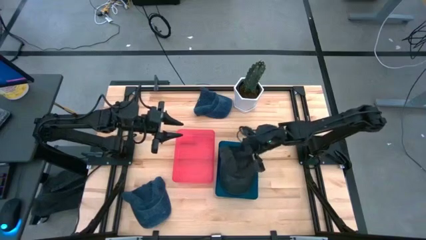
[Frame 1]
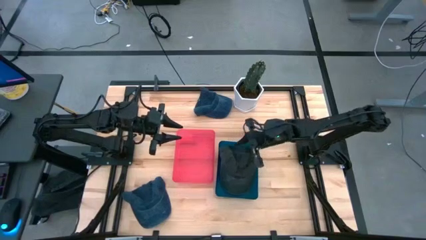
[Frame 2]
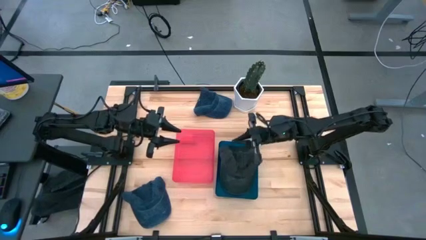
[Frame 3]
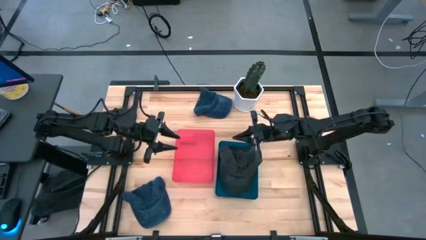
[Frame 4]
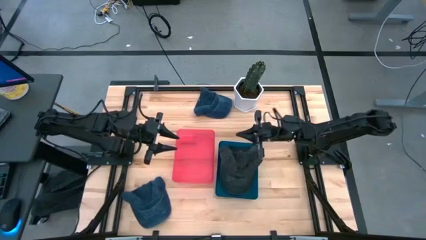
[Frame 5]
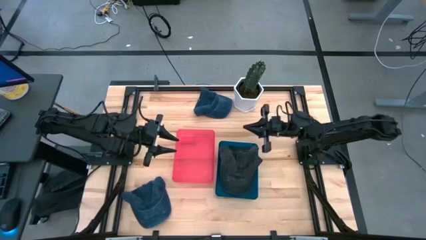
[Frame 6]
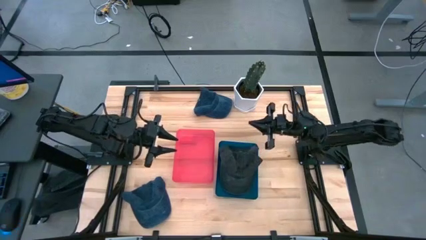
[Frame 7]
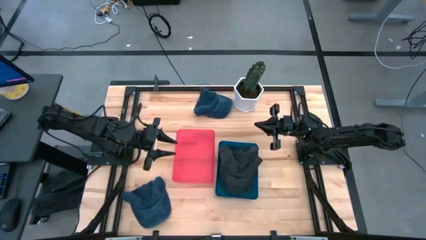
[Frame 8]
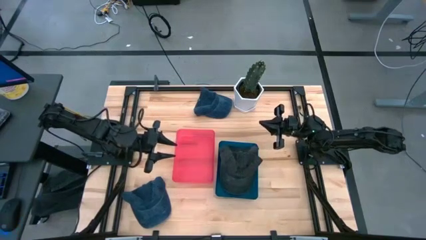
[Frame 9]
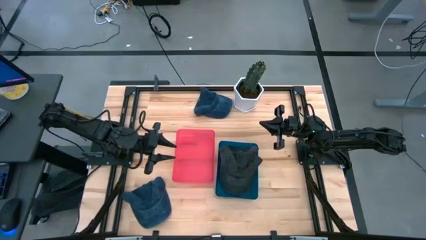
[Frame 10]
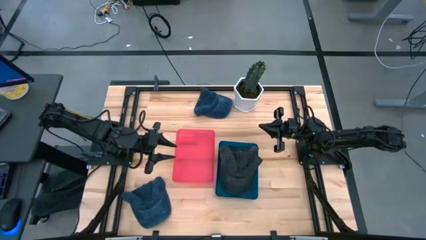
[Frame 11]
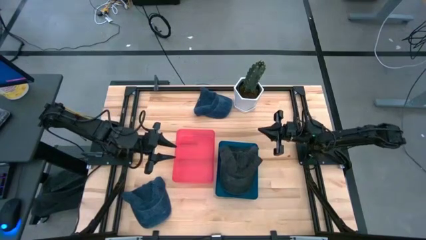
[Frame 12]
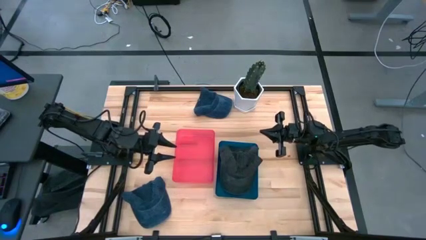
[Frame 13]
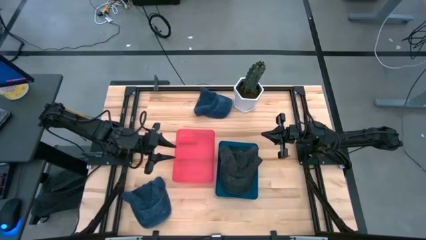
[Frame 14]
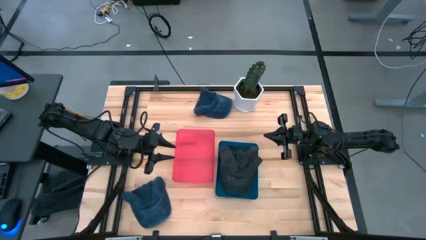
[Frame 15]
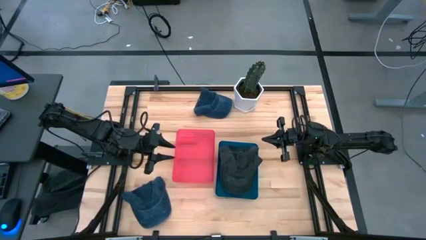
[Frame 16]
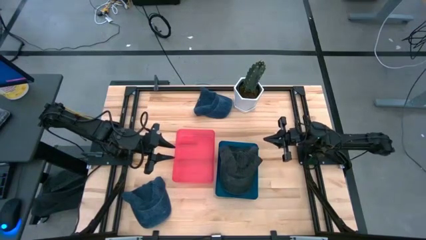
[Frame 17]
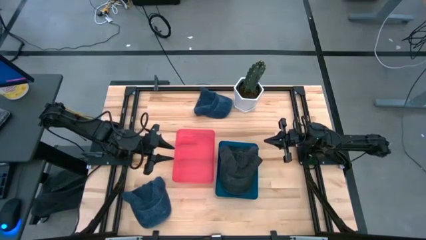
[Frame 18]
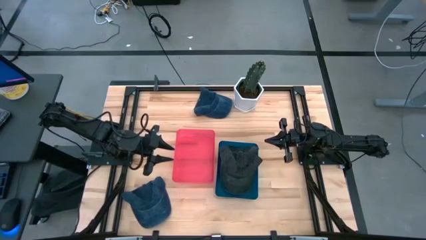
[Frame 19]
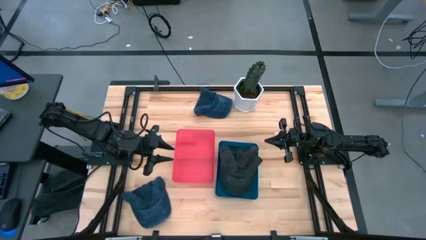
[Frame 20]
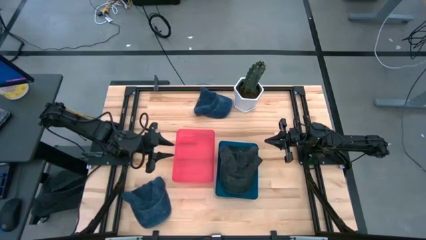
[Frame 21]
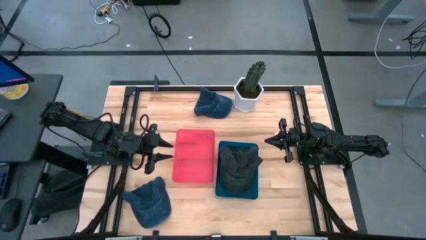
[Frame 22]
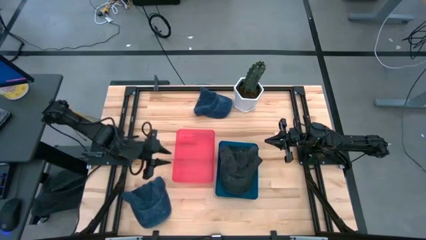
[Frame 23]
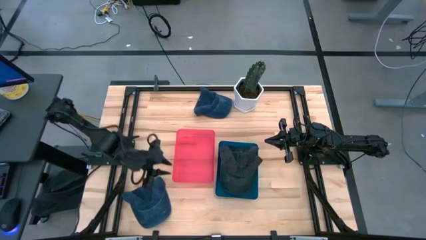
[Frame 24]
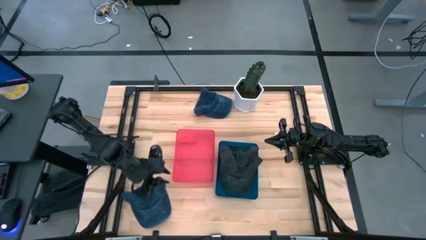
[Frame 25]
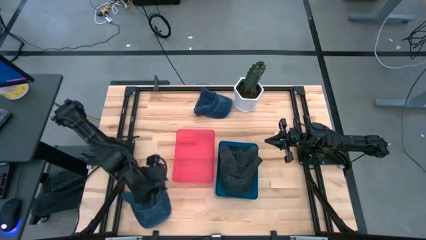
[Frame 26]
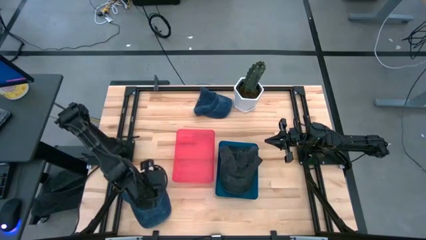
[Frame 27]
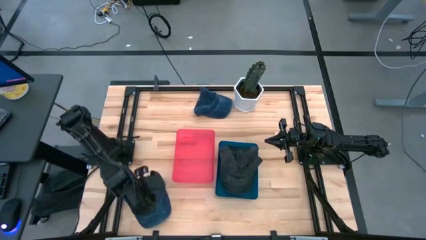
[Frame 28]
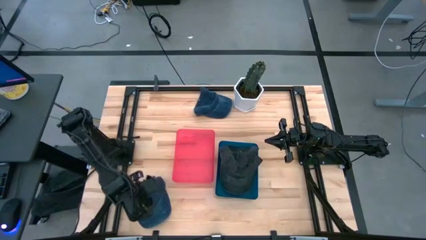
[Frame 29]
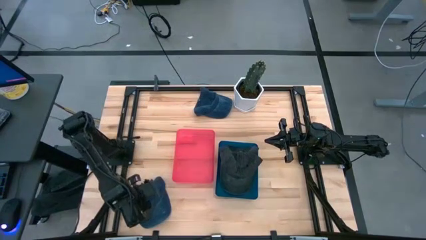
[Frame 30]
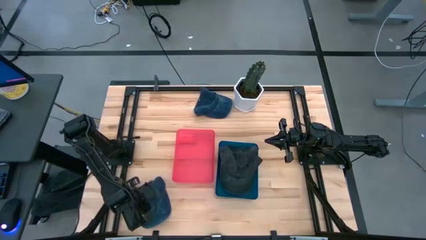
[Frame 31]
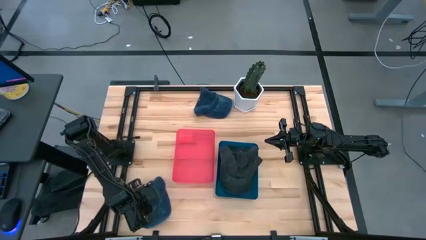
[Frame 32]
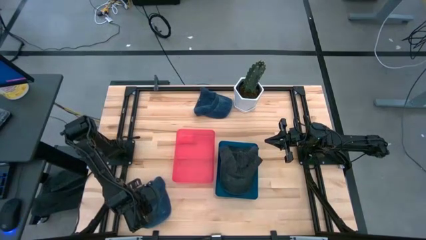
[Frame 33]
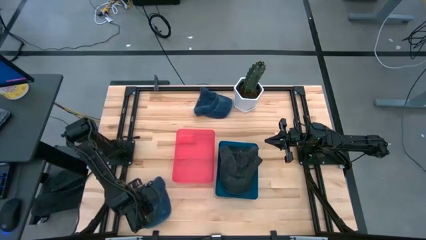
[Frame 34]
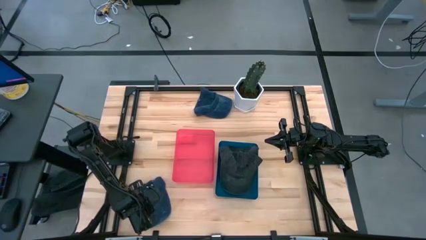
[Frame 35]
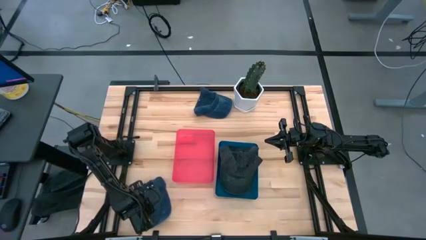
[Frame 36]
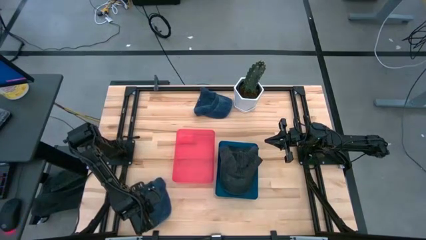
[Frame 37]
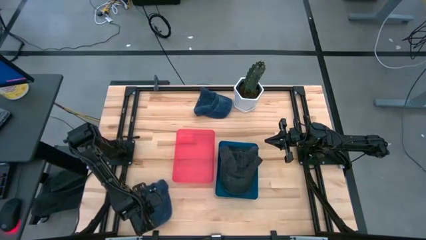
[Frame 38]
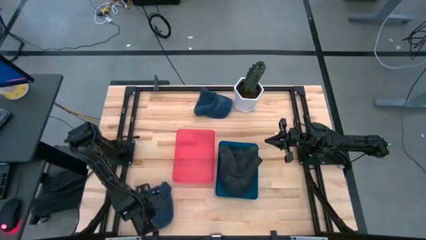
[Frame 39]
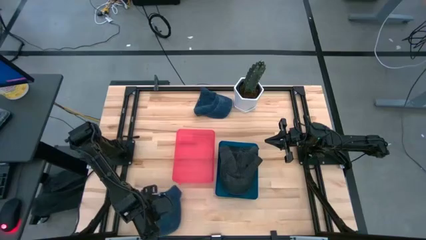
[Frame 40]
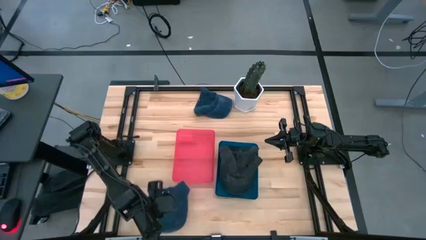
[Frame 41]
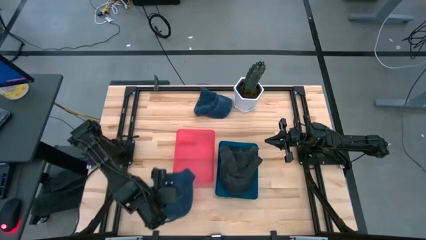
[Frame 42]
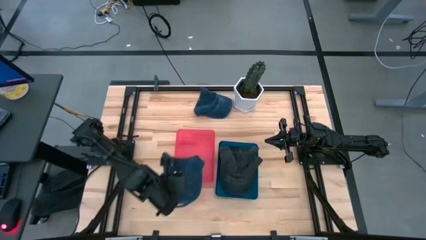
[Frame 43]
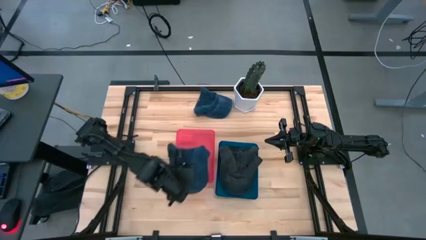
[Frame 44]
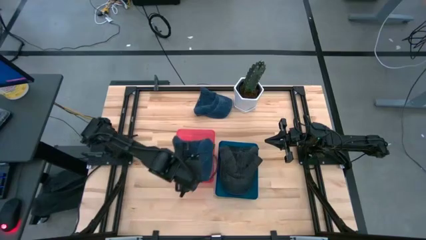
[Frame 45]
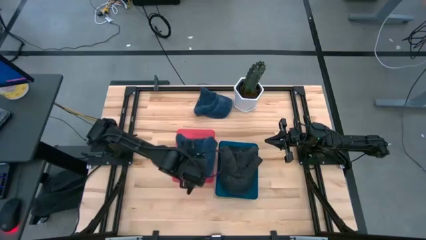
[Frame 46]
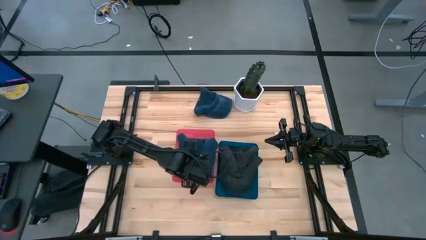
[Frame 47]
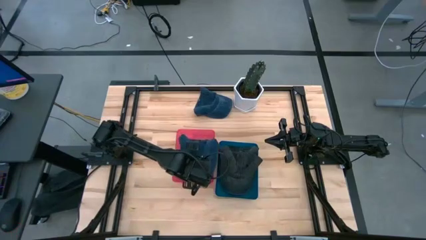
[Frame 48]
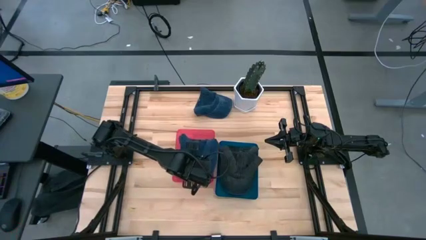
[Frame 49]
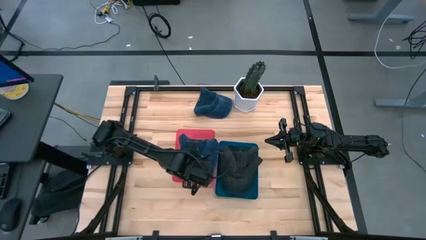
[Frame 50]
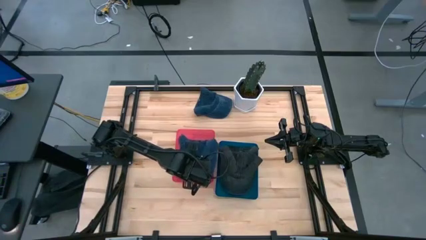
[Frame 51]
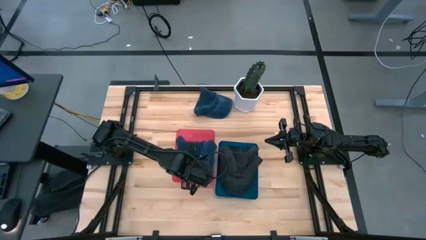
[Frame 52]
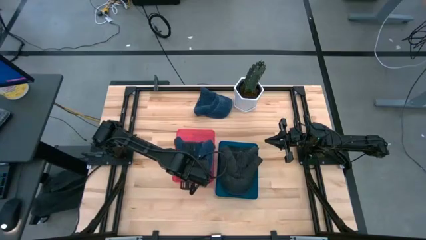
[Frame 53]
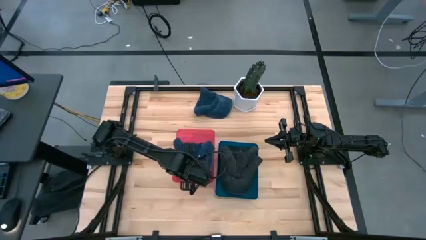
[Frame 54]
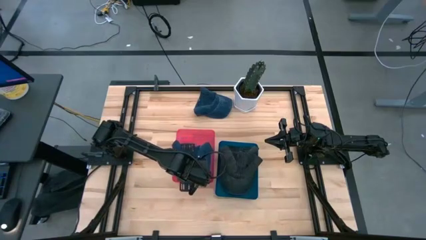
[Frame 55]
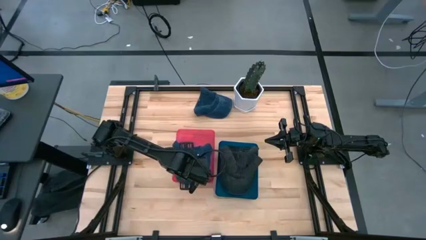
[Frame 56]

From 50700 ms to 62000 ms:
Task: Pick & Place hat
Put the bottom blue cap into the red bin

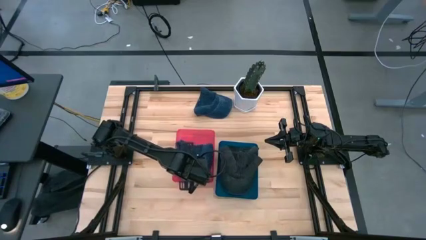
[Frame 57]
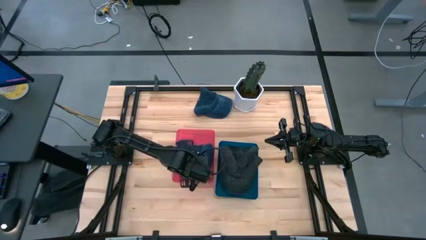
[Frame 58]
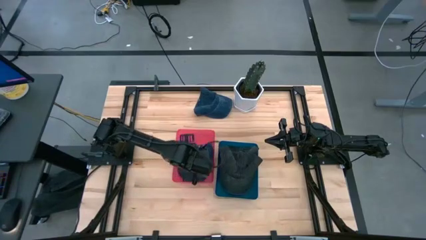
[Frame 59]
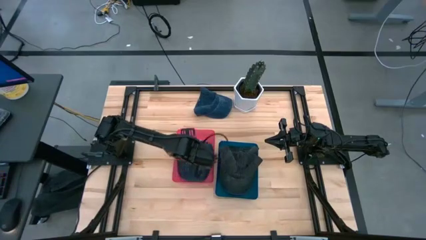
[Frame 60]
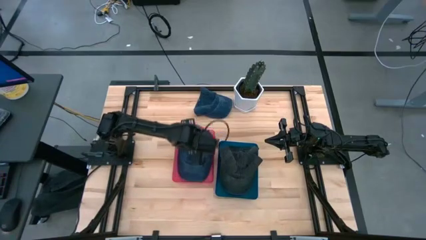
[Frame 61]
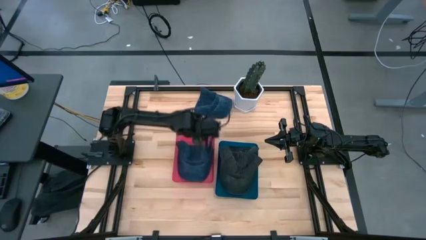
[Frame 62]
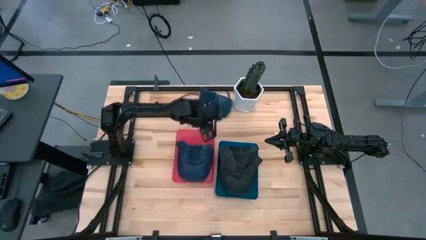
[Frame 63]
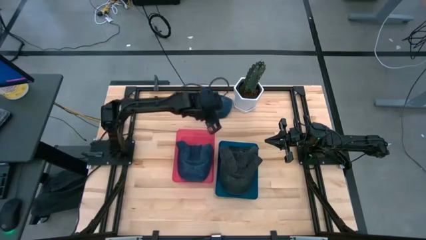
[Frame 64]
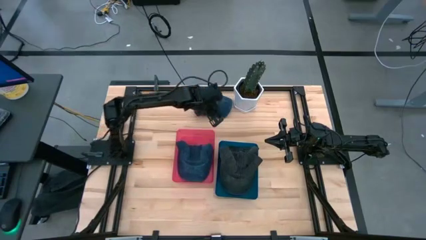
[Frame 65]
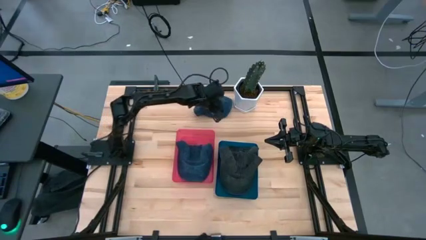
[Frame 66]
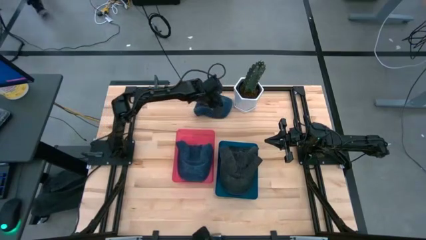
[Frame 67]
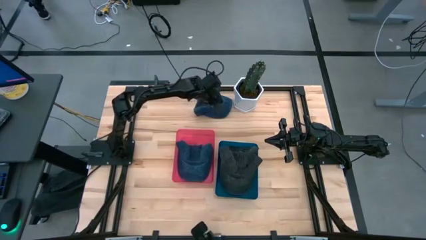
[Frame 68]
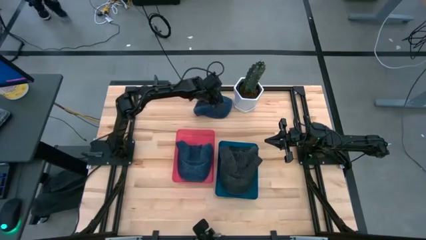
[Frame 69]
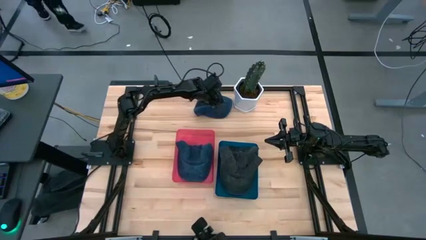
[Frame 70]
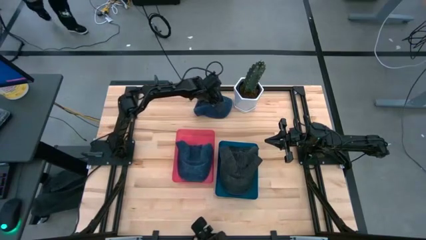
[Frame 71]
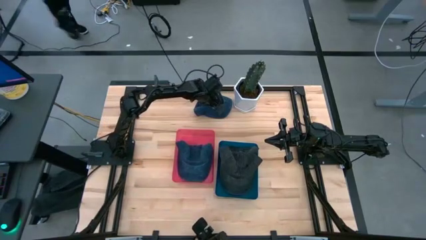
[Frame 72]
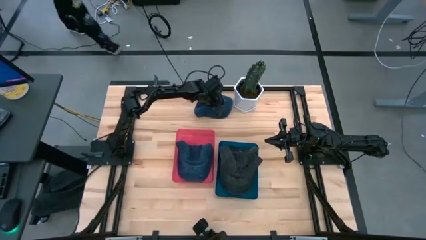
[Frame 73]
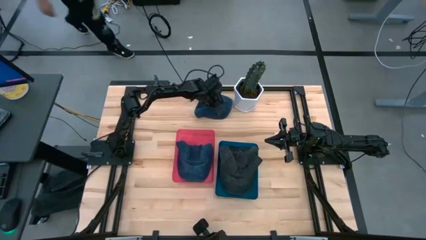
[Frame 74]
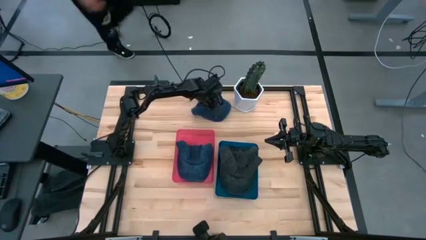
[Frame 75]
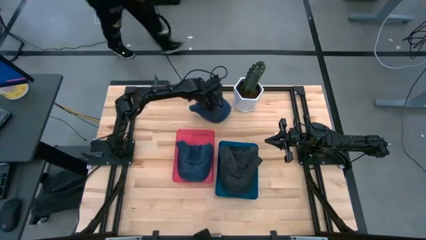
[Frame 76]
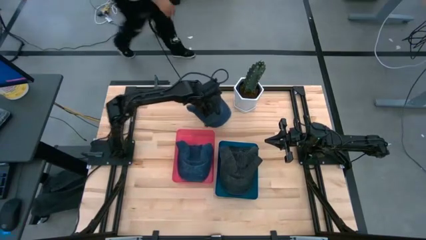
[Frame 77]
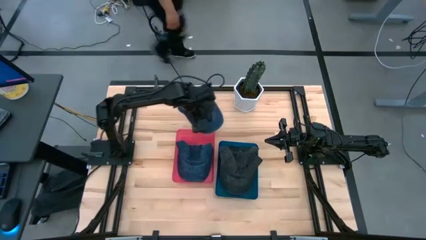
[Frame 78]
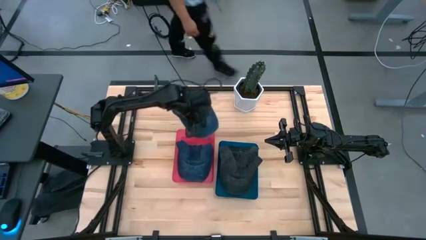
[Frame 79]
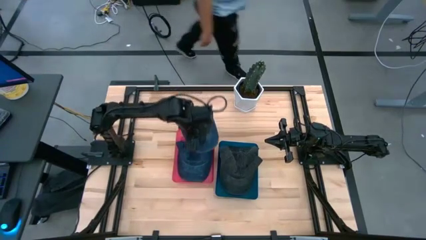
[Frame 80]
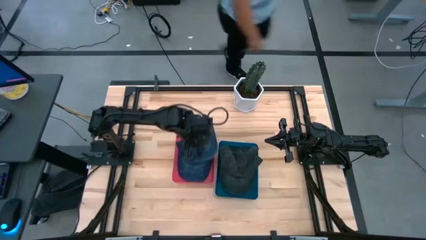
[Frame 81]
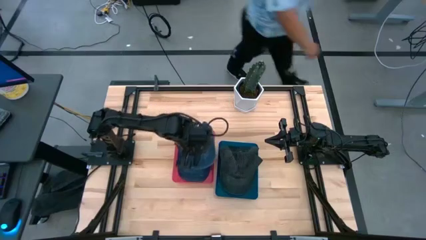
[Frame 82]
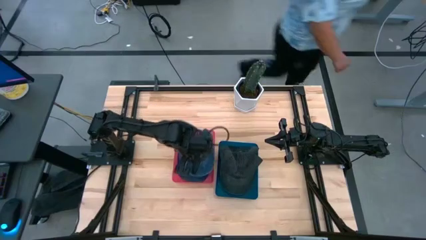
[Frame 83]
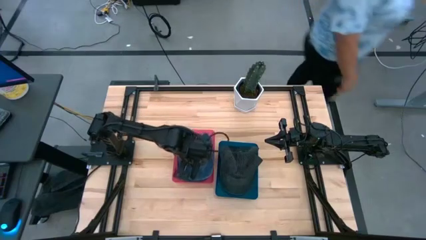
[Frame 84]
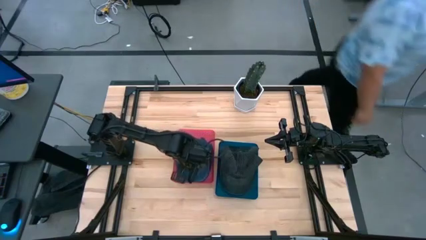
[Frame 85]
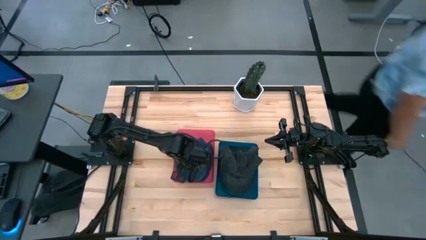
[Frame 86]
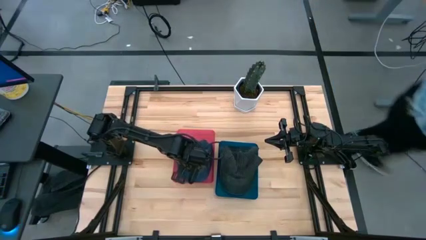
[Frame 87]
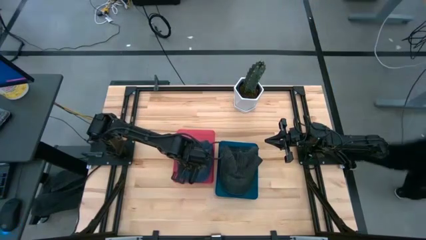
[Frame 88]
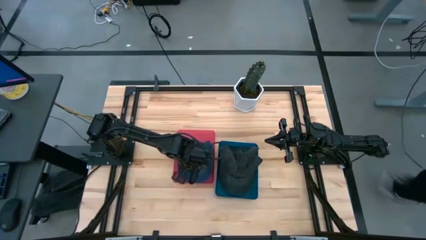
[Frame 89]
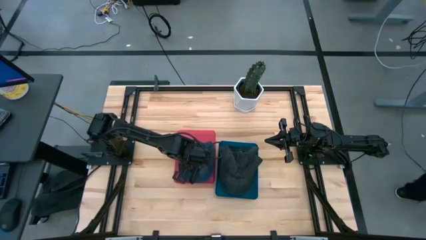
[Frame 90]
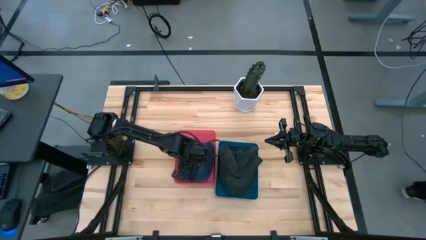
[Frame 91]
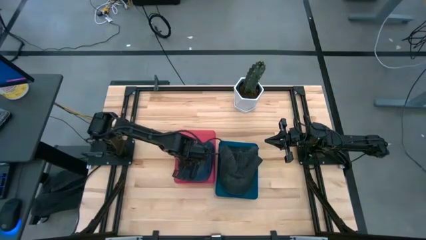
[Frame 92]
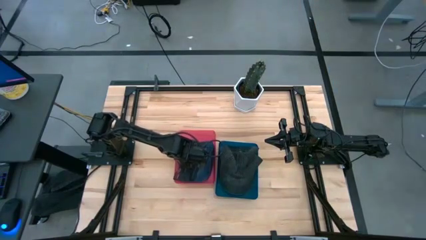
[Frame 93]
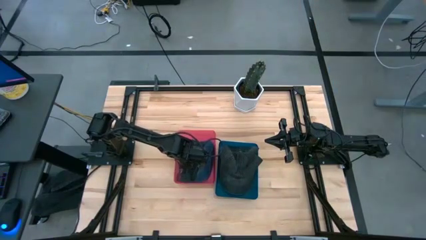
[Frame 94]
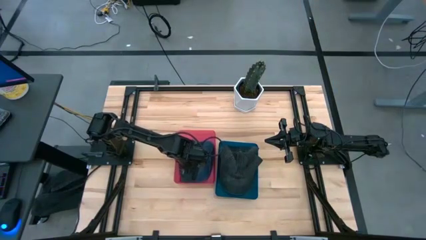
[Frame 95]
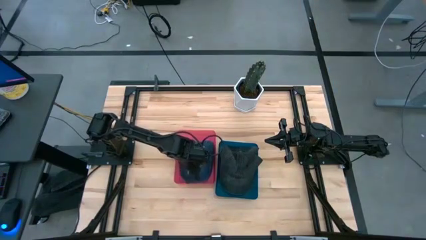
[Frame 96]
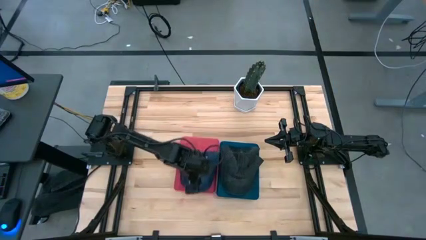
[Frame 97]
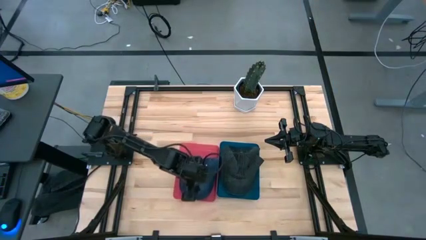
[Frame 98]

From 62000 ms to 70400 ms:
Put the blue cap into the red bin
